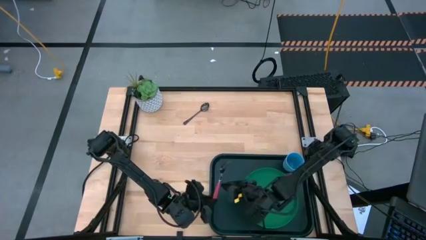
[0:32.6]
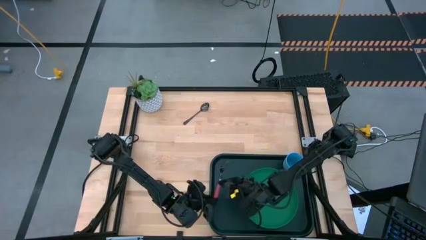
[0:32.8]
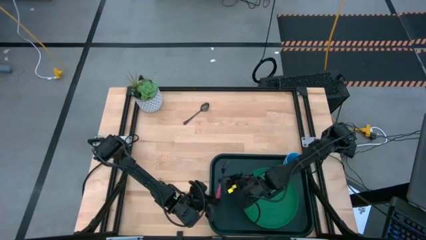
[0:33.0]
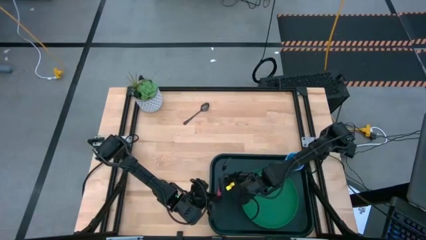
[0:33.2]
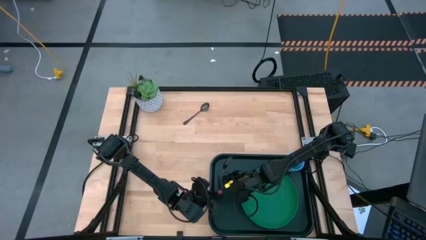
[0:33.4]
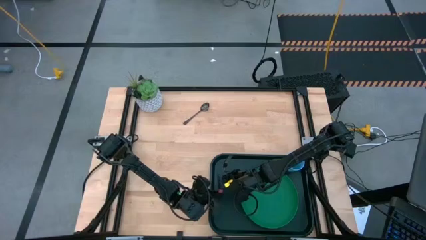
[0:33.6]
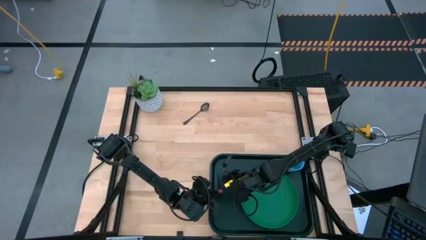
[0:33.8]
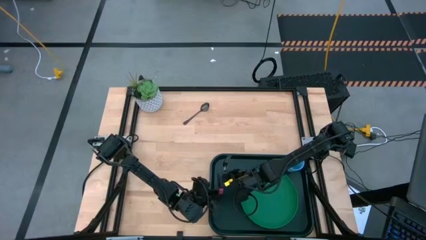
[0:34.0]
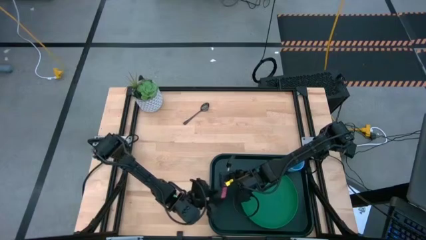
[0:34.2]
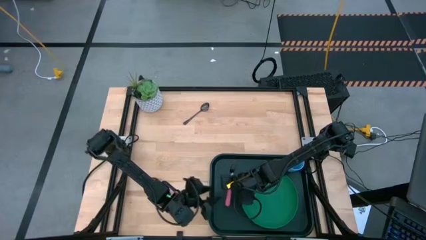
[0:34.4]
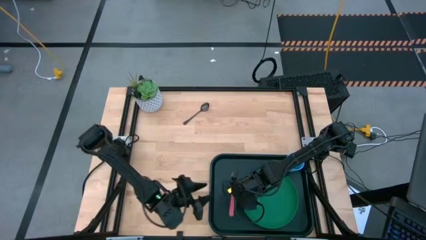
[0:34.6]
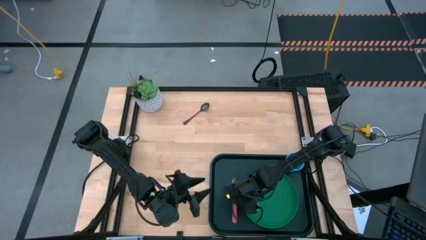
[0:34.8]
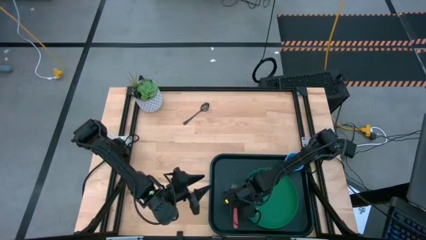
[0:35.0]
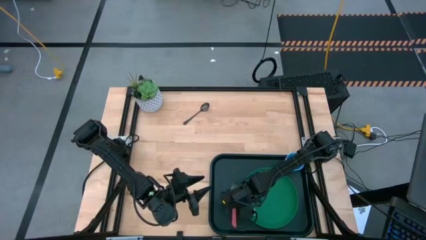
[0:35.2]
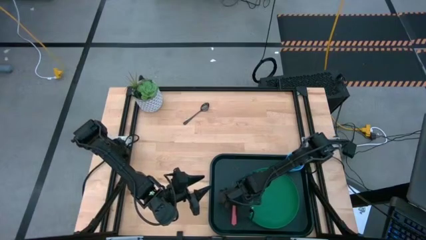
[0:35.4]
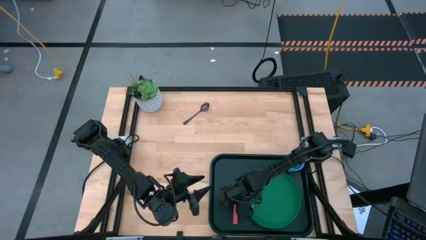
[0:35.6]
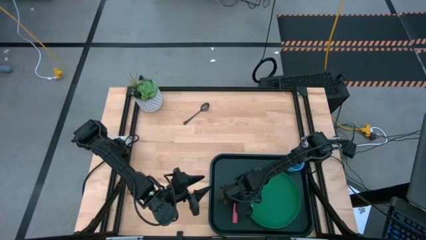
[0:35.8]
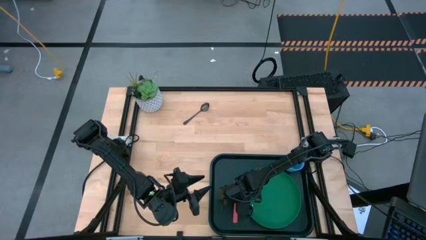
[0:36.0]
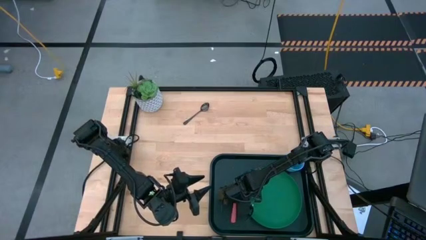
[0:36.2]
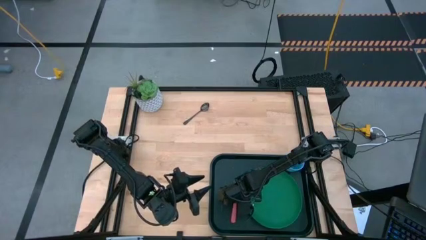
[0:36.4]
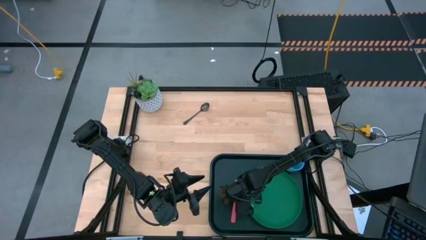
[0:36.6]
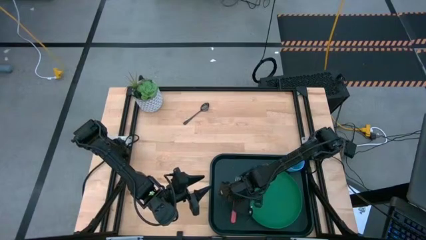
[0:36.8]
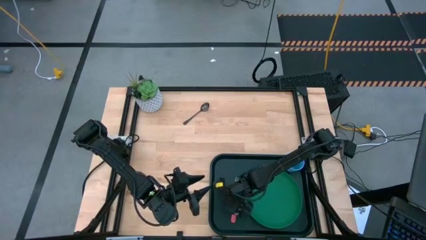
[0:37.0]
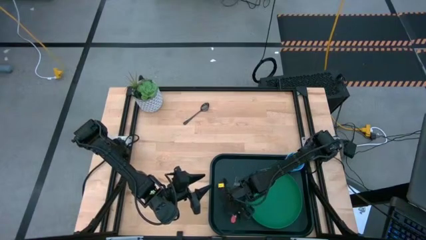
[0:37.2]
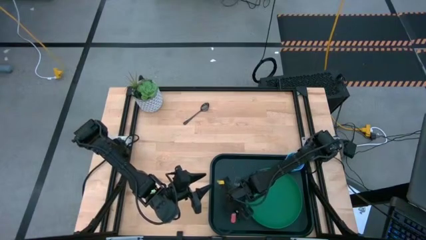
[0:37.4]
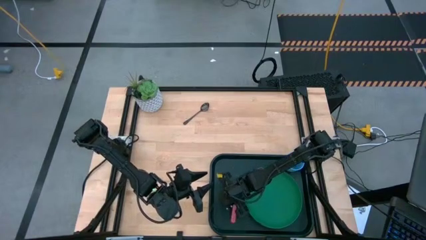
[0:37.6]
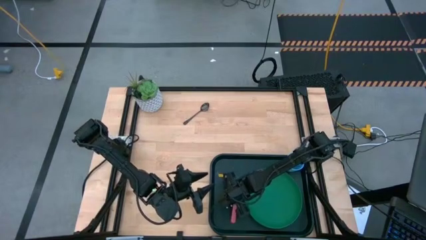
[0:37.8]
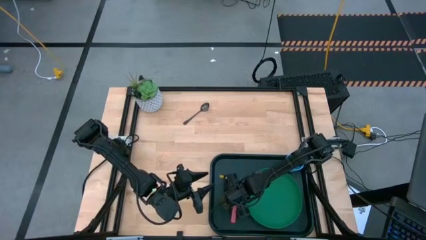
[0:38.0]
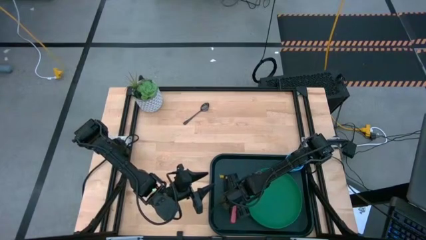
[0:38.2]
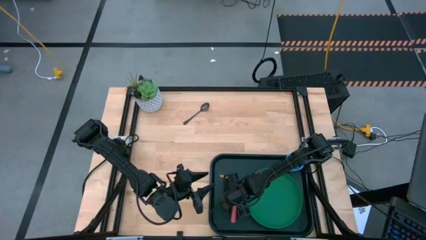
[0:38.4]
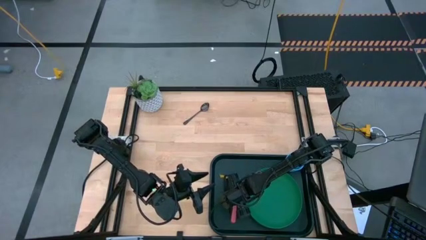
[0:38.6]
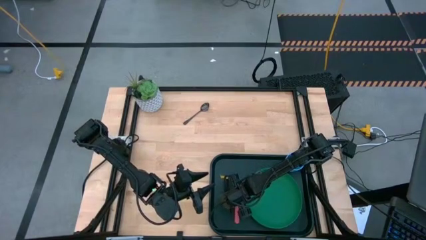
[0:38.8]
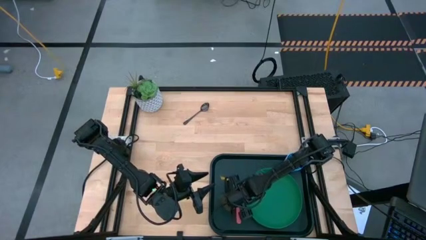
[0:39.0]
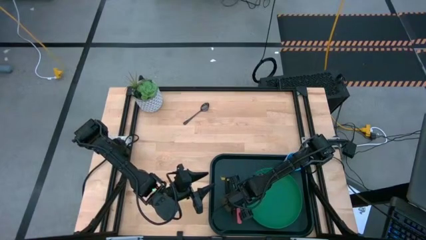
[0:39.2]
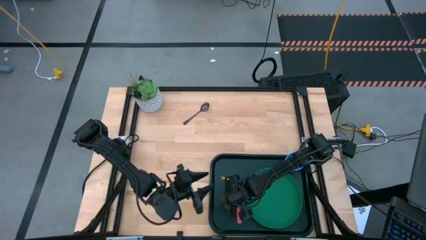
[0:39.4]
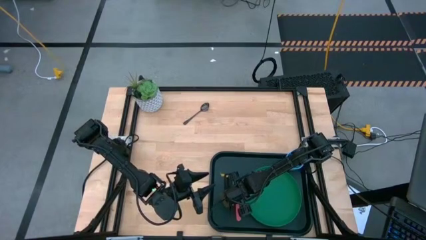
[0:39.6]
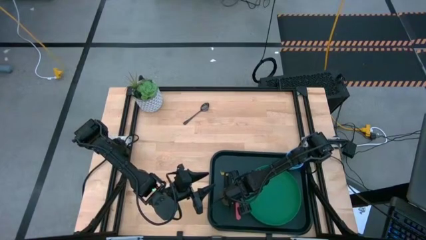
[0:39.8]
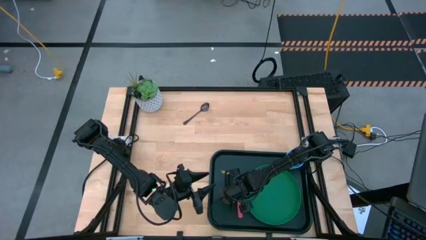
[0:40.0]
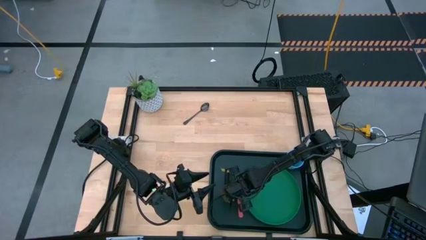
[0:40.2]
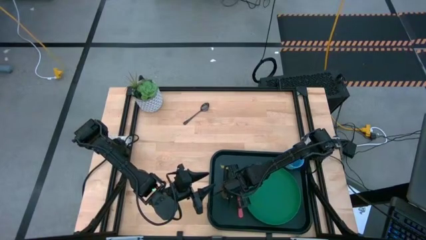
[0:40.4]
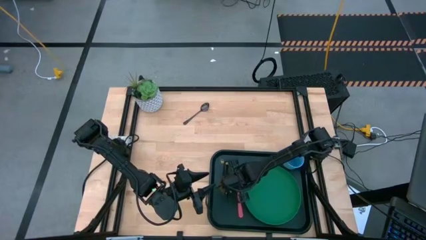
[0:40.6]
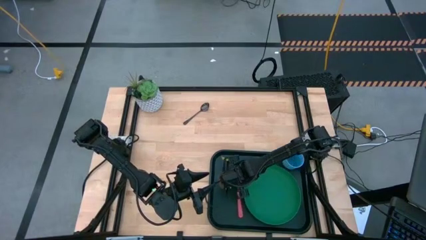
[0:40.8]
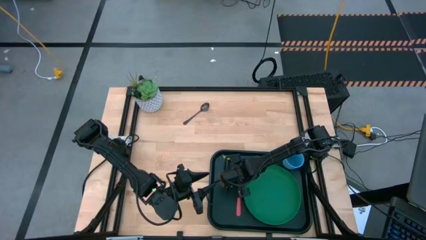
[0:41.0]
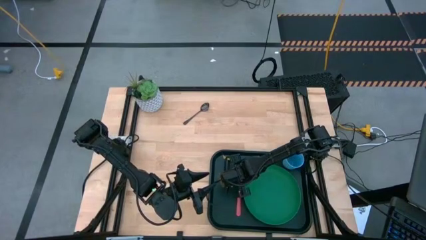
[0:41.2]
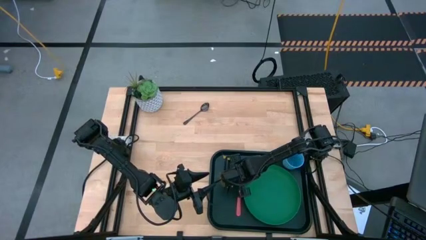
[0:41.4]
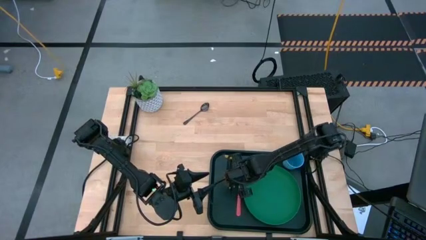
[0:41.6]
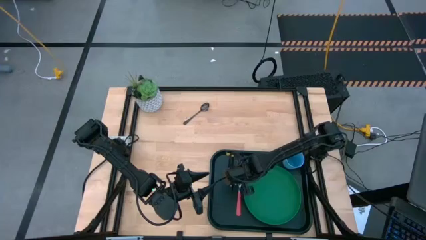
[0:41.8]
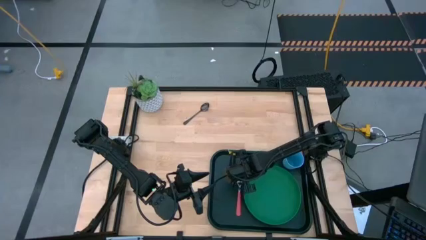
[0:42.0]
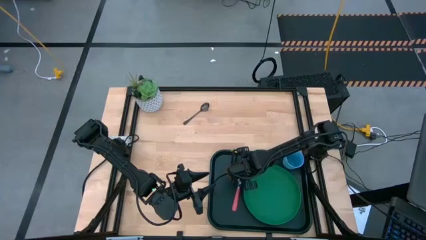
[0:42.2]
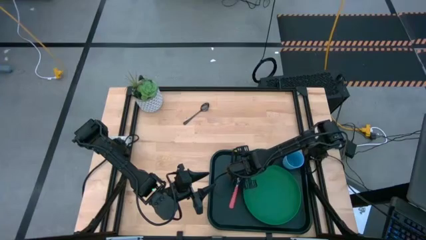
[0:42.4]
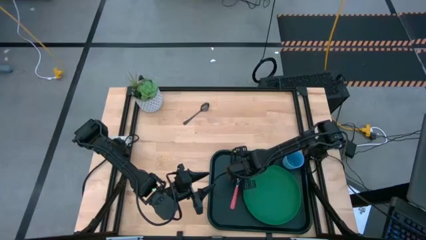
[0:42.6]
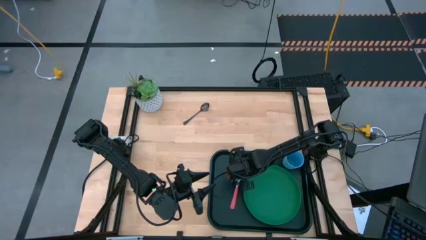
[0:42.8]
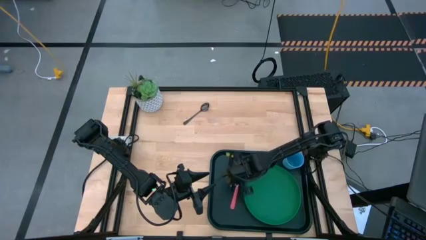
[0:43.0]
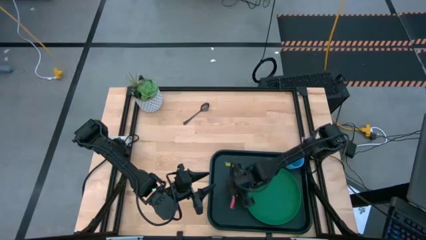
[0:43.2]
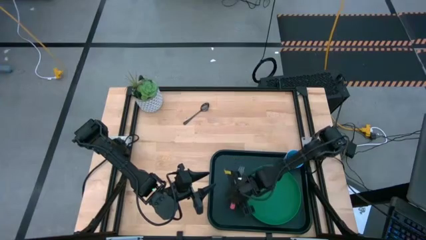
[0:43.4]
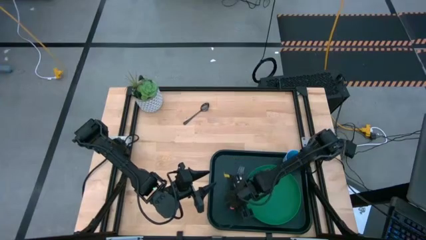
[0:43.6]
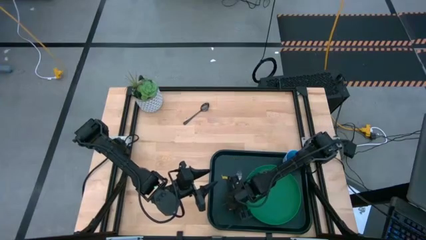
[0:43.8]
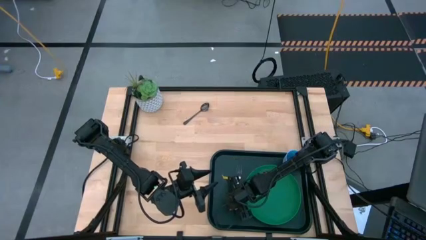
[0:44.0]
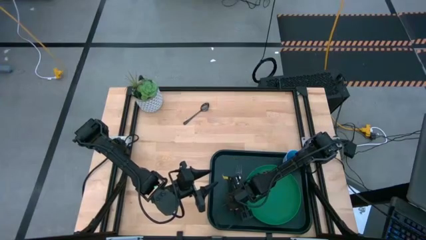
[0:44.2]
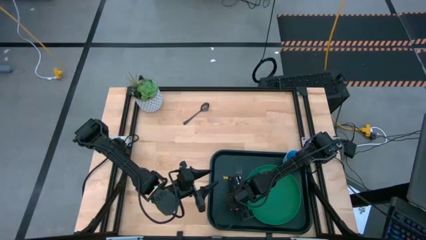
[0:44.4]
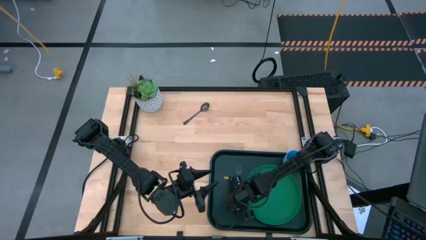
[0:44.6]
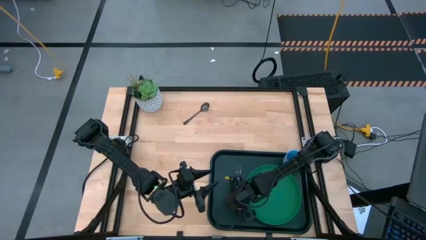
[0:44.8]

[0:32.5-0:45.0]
Task: Pick and place plate/cup/fork/spoon on tray
Put the orange fork on the black serving tray beside the green plate

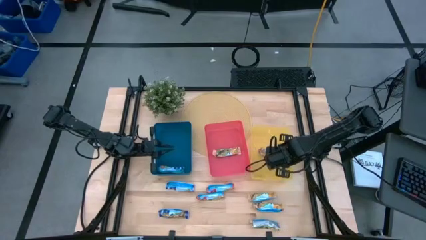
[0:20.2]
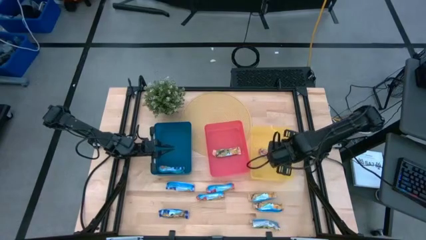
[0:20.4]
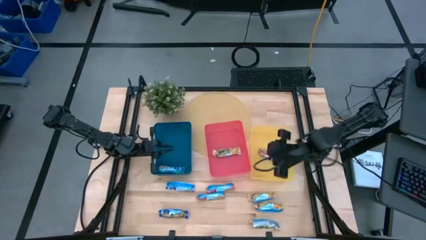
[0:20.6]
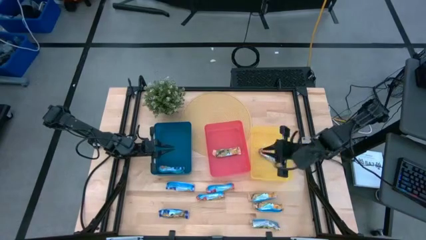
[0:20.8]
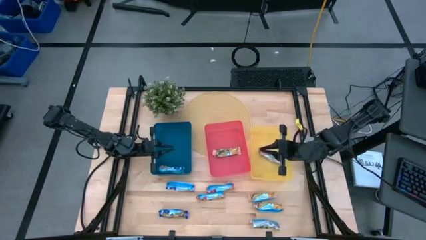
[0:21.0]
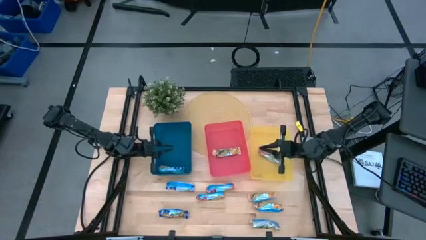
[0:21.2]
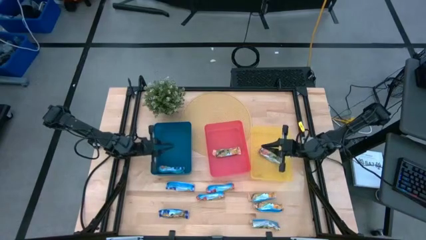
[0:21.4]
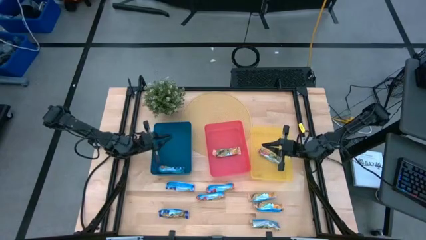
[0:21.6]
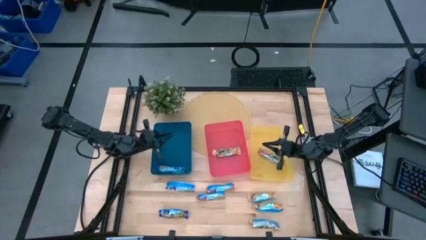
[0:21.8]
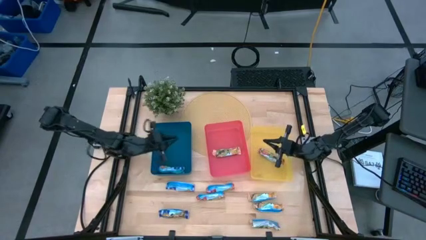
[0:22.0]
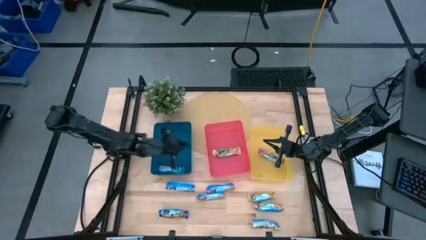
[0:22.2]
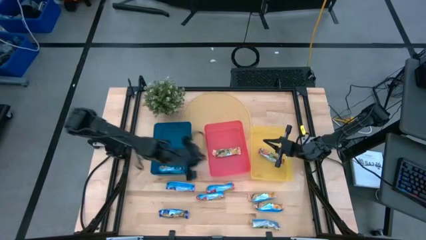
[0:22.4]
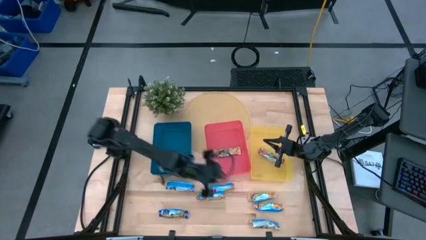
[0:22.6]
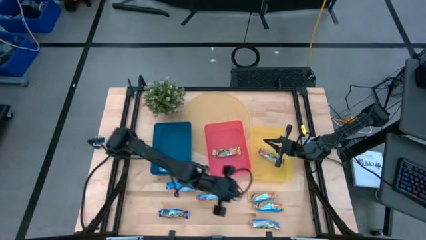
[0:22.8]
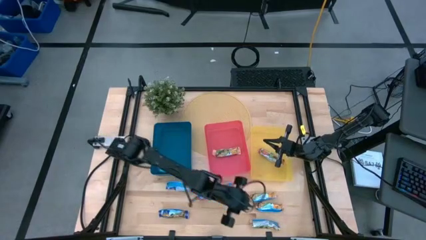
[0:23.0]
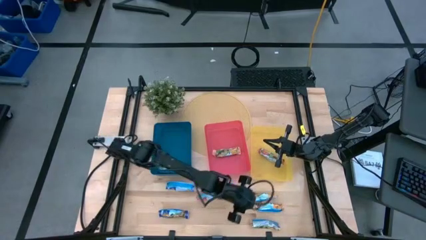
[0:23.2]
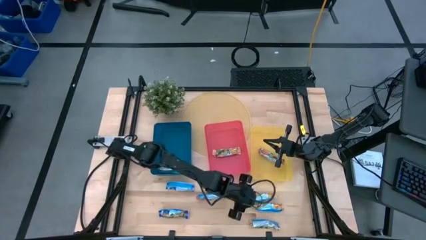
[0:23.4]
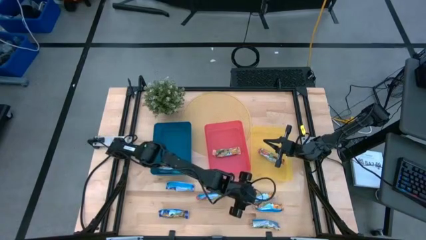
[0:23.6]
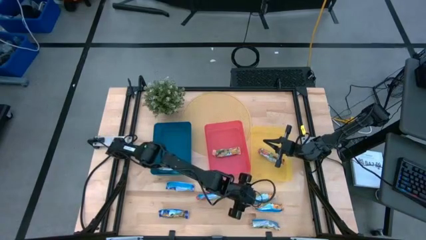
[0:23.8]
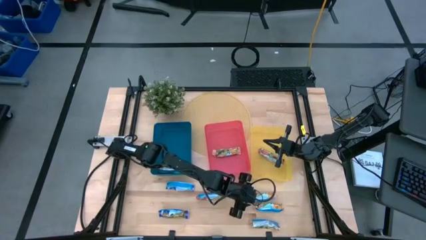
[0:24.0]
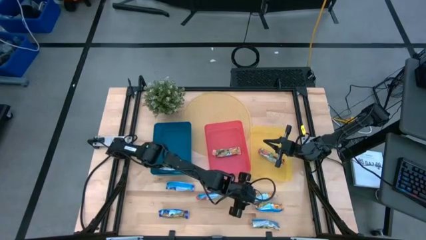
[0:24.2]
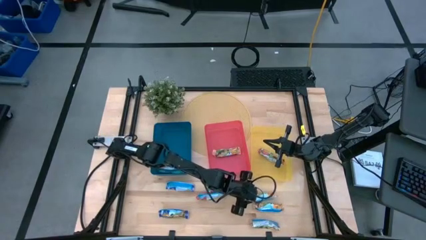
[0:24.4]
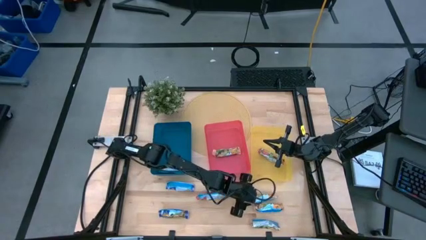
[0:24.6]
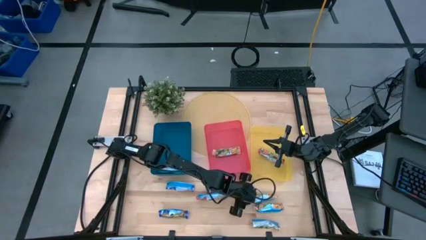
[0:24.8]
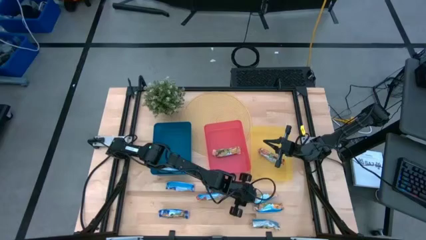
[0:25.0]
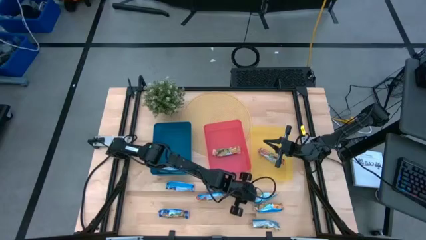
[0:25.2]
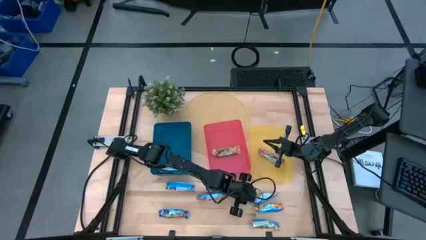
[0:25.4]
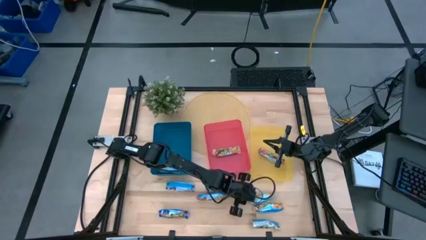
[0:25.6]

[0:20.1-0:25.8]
Task: Pick and place Granola Bars by type
Put the yellow granola bar into the red bin
